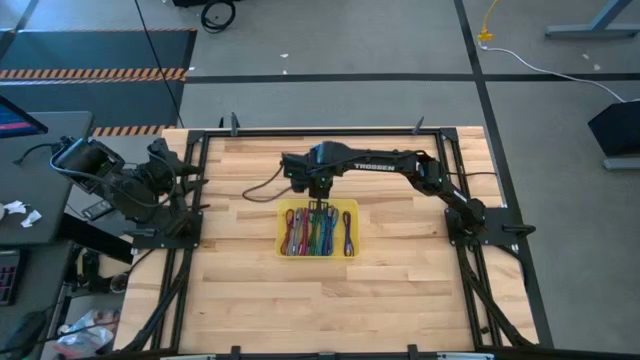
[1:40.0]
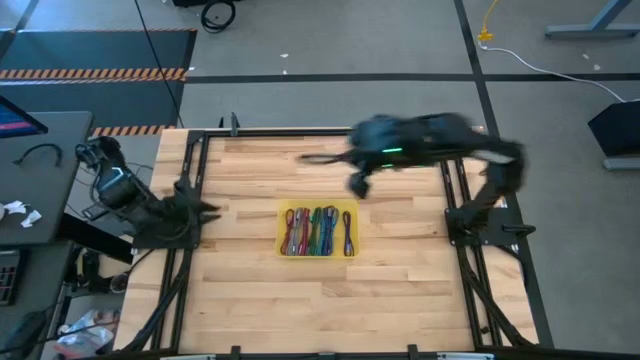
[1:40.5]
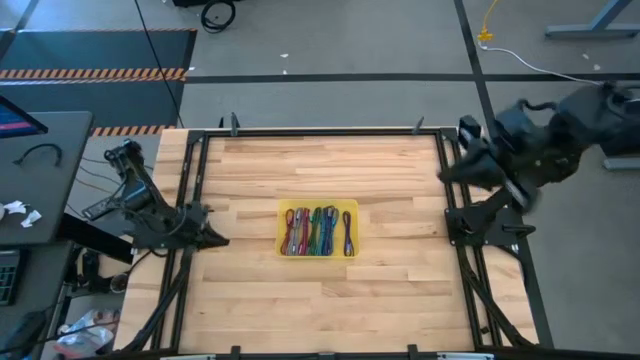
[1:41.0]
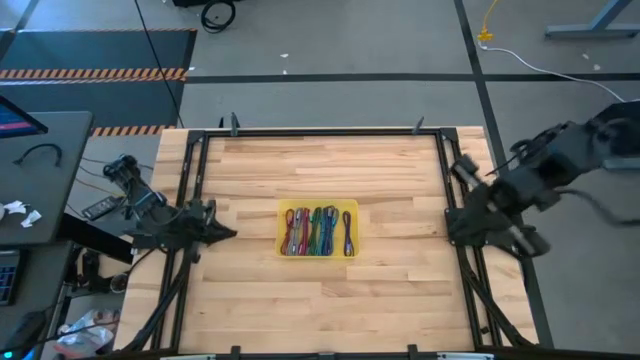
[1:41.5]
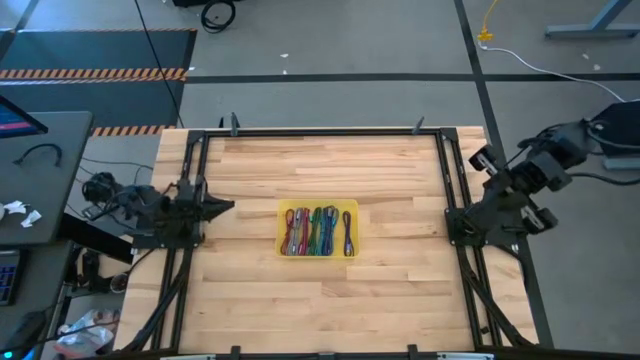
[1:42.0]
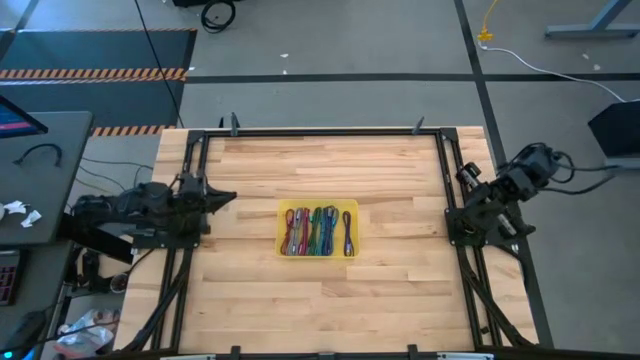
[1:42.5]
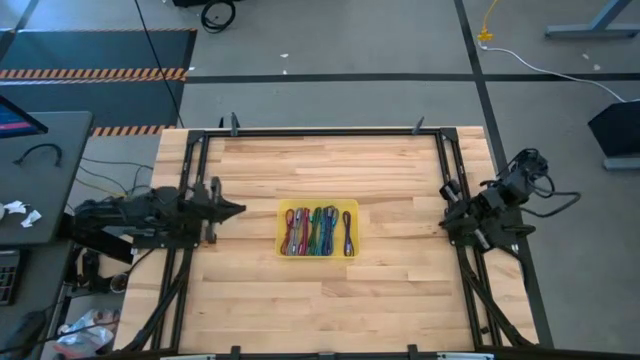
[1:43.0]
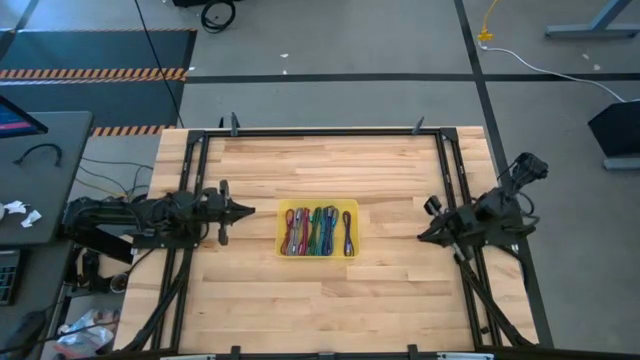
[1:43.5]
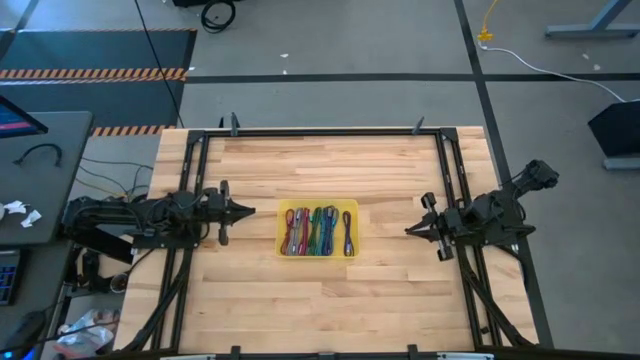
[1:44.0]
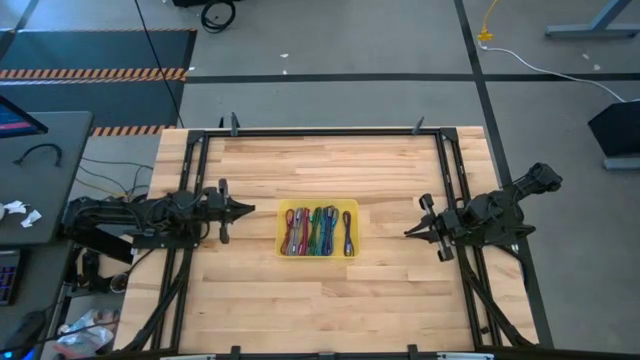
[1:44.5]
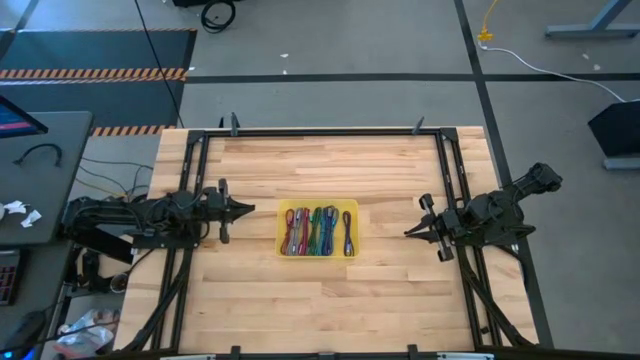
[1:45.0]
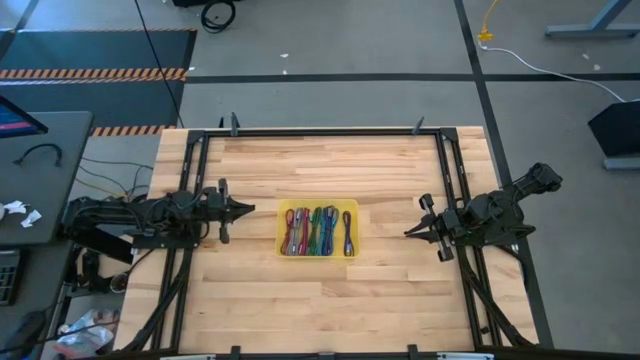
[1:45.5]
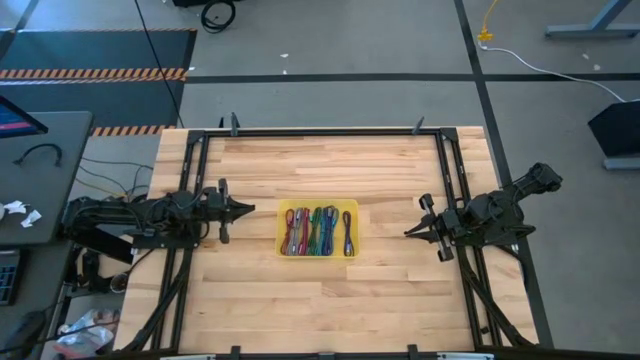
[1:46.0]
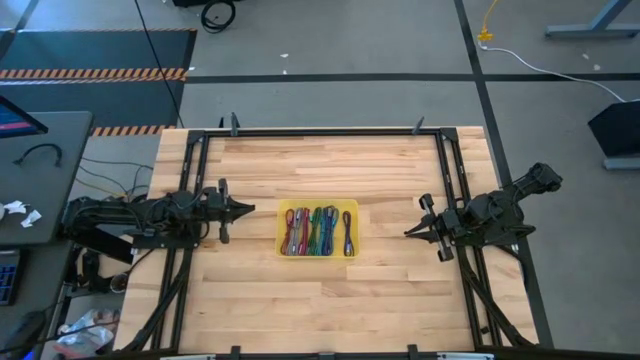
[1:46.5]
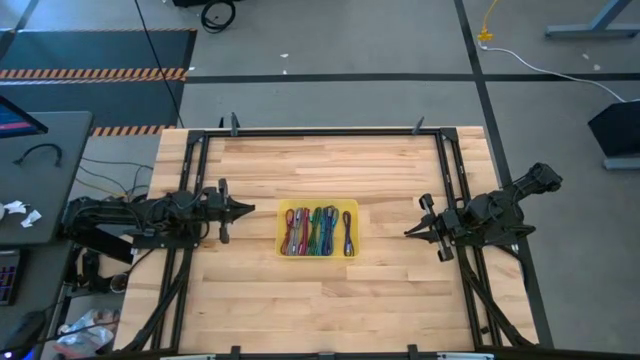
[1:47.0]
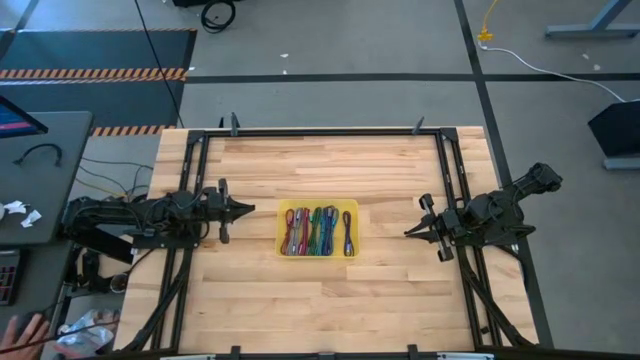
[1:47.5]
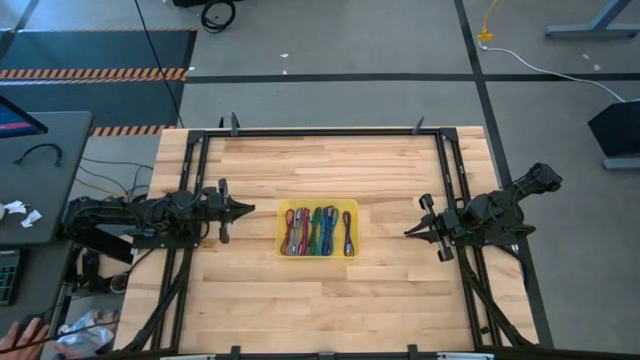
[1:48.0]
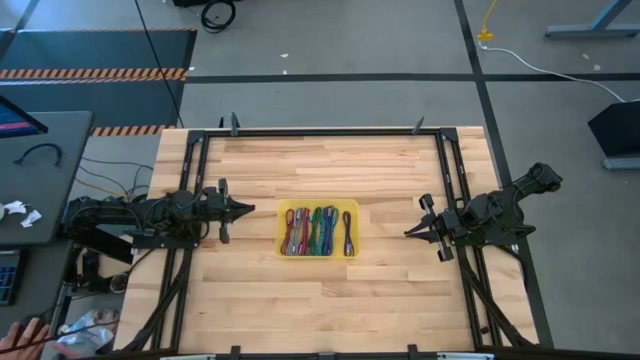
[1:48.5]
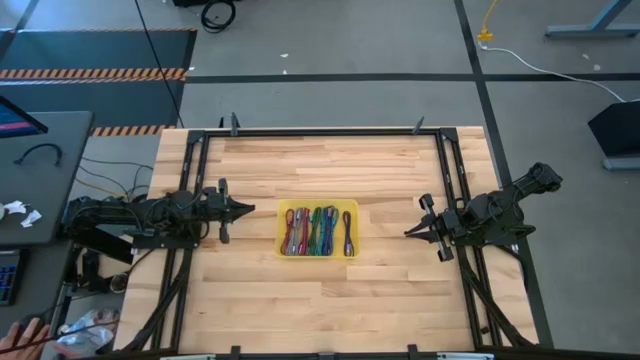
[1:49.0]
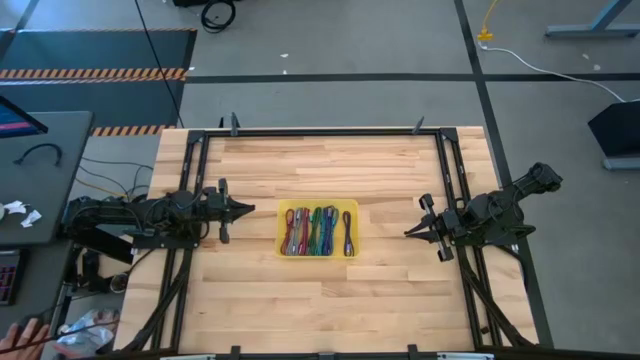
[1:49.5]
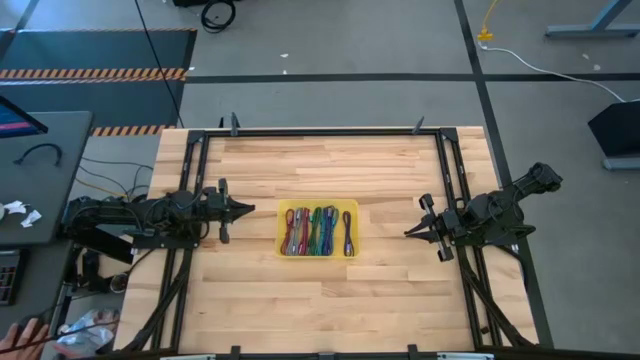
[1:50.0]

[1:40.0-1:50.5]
Task: Pick and place USB-C Cables
Return to Home Position

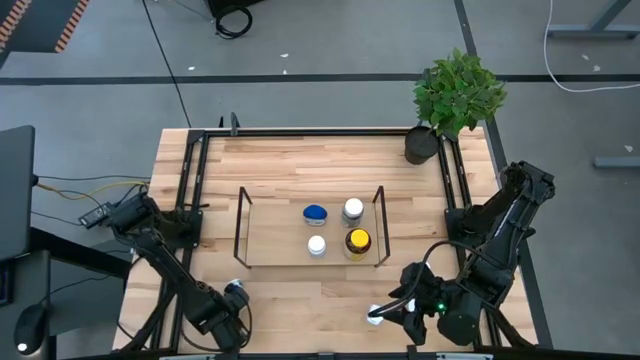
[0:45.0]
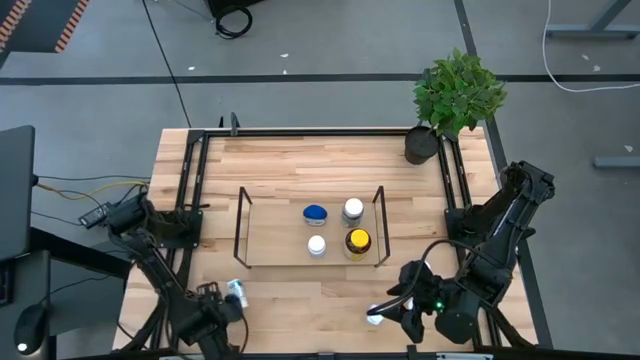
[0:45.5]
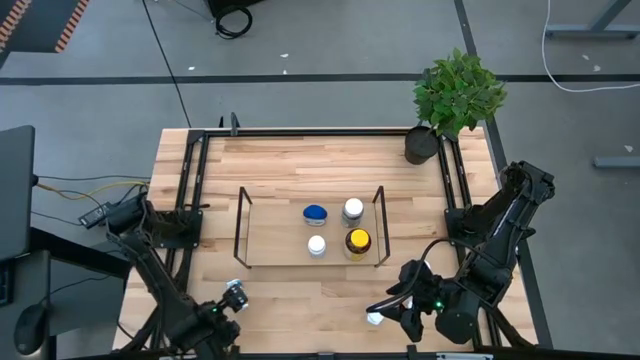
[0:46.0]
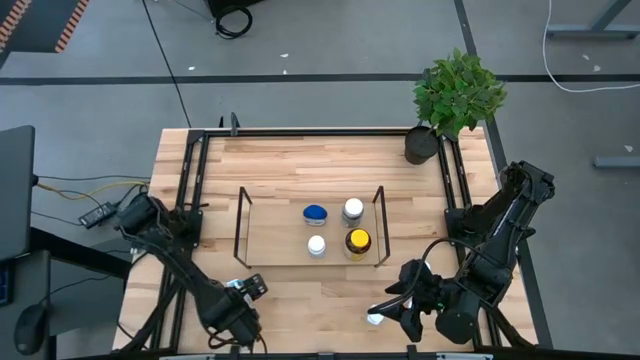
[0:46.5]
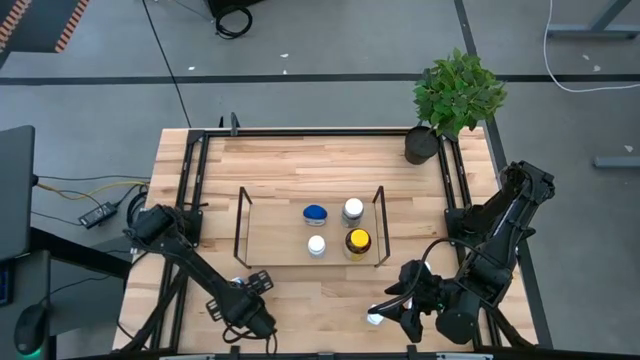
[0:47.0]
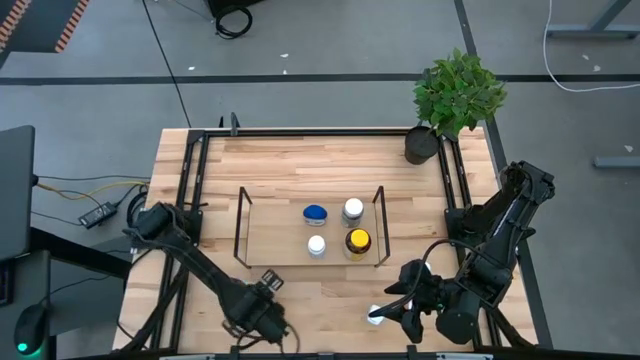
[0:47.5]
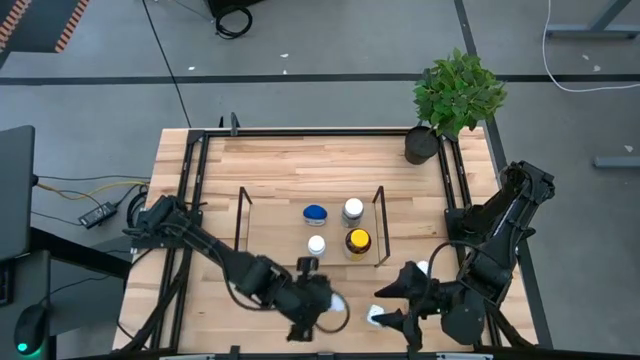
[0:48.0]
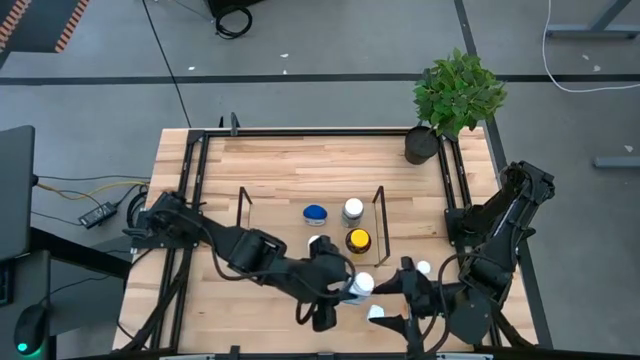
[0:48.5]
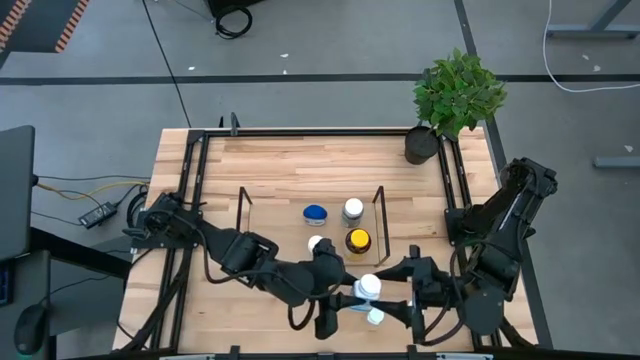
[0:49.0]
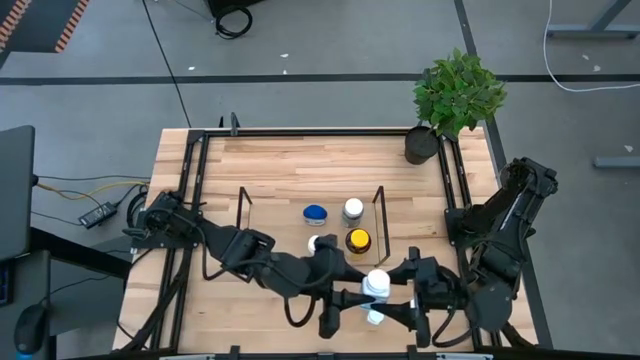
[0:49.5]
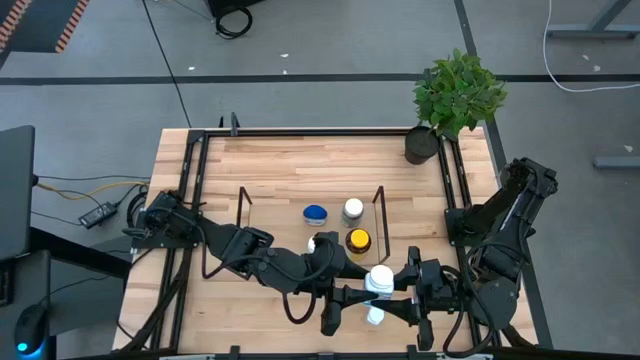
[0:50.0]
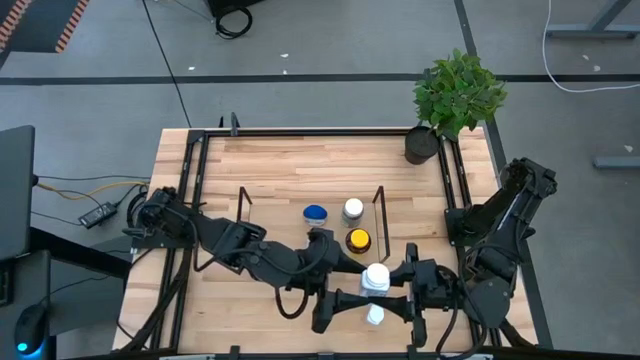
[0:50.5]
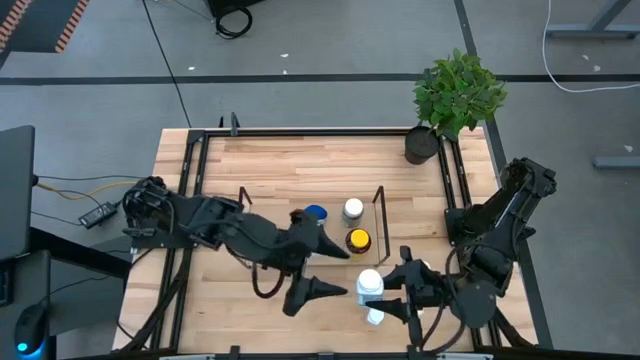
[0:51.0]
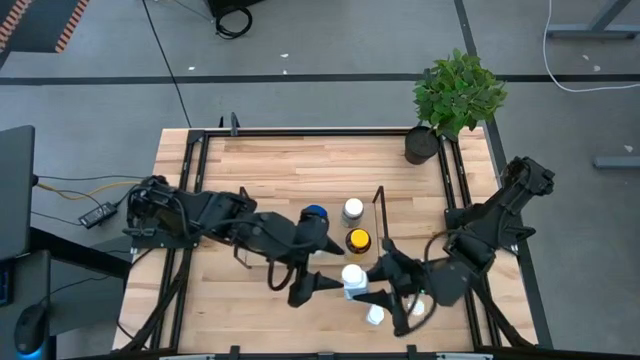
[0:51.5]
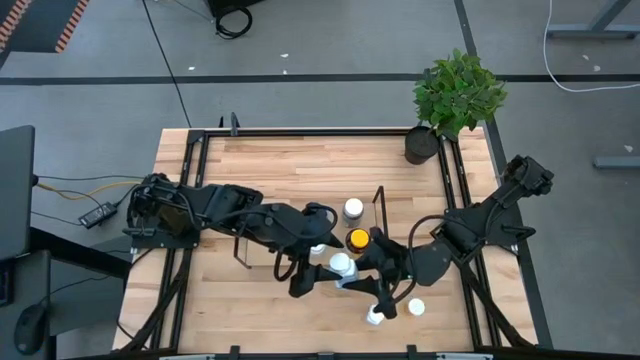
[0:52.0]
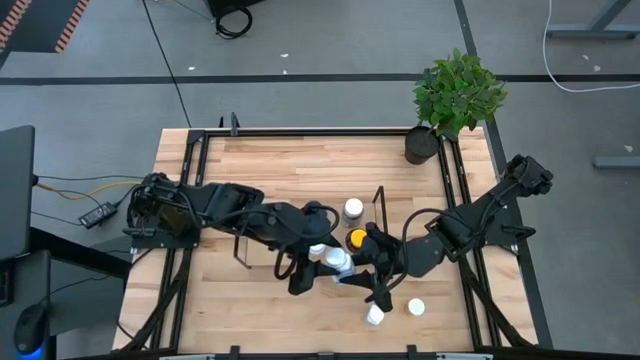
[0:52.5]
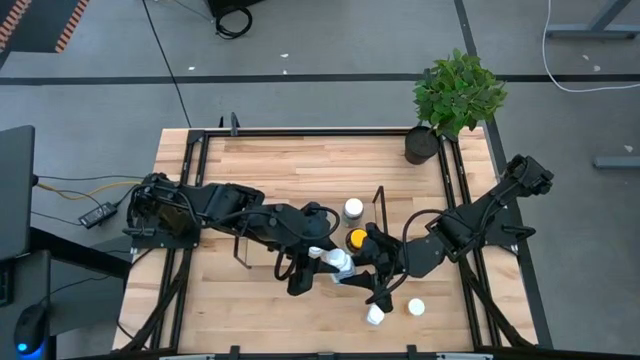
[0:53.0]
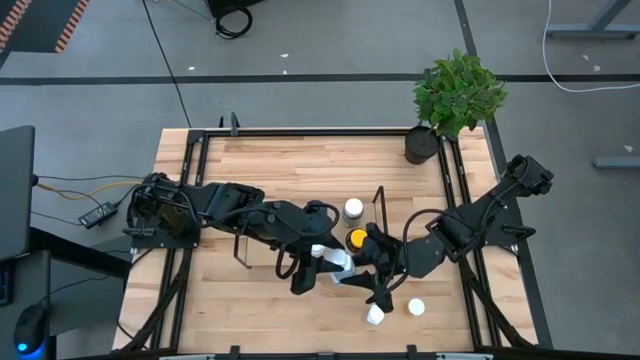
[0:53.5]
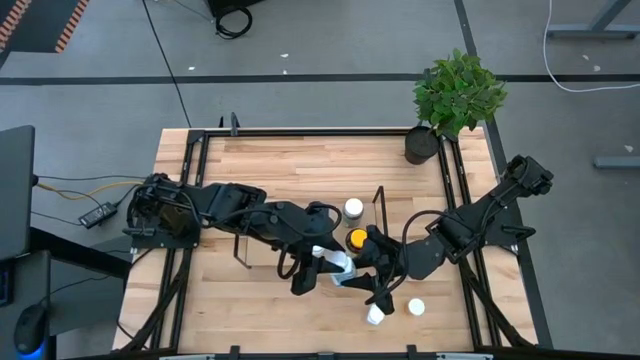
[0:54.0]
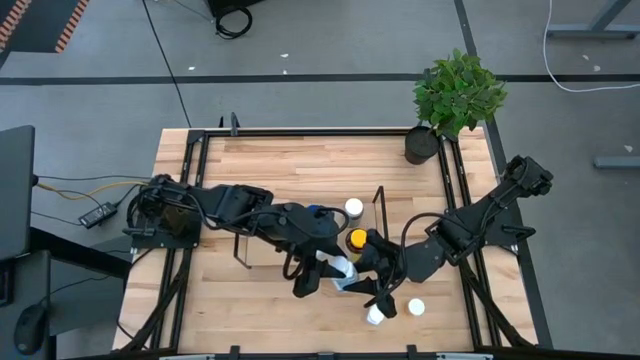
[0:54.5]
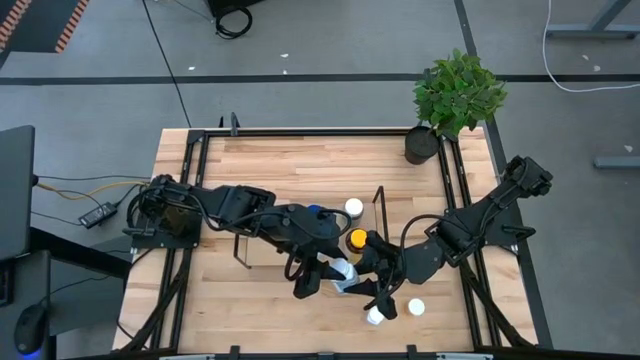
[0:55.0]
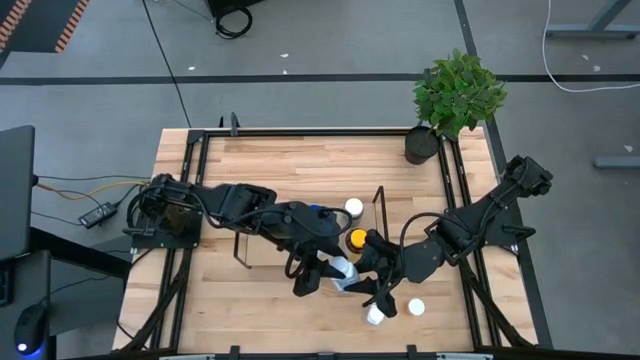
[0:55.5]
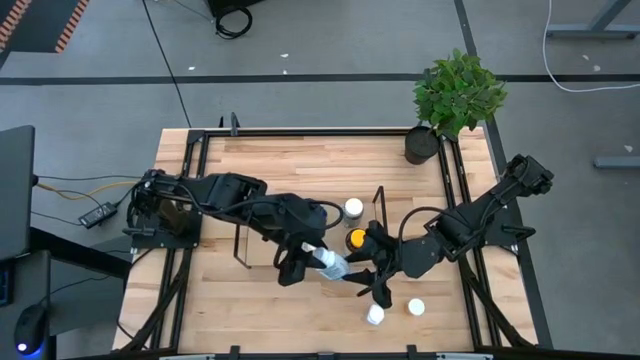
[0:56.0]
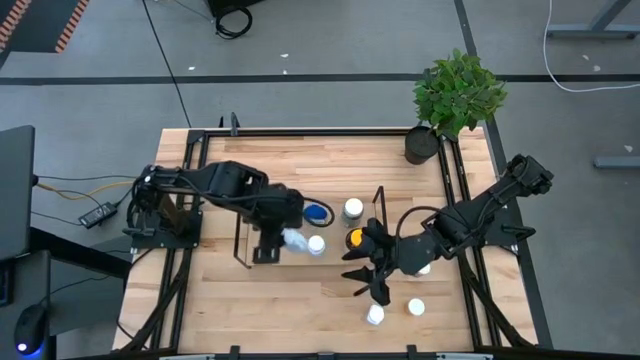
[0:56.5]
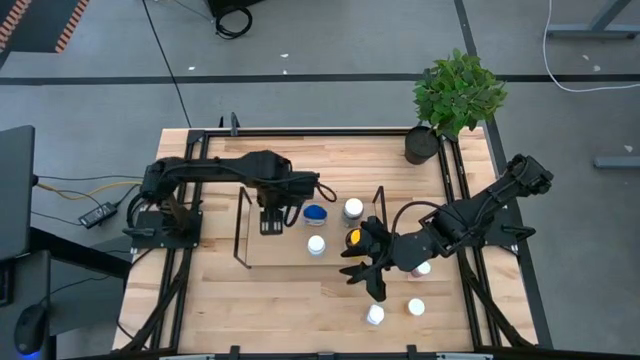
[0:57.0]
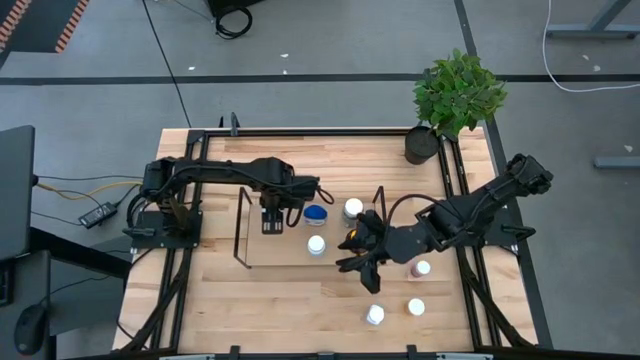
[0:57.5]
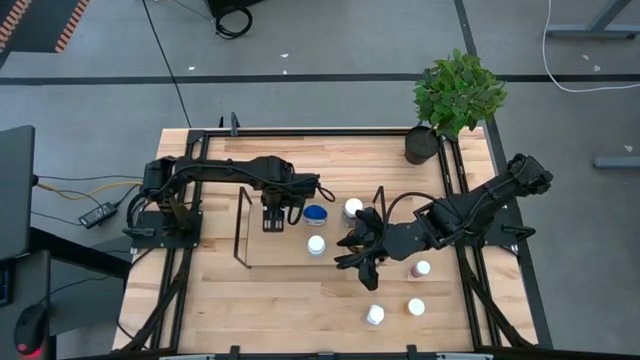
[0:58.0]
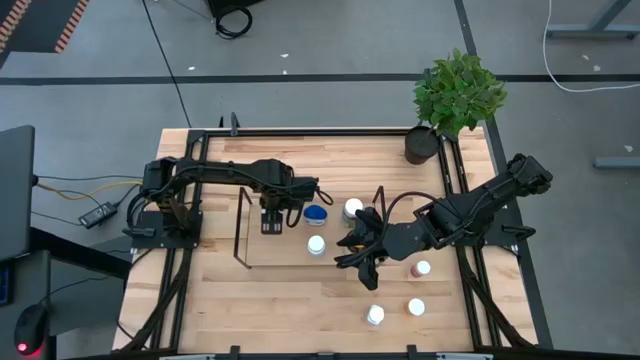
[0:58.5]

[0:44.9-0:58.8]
Task: Pick and place medicine bottles onto shelf by color
Put the white and blue medicine bottle on the shelf
